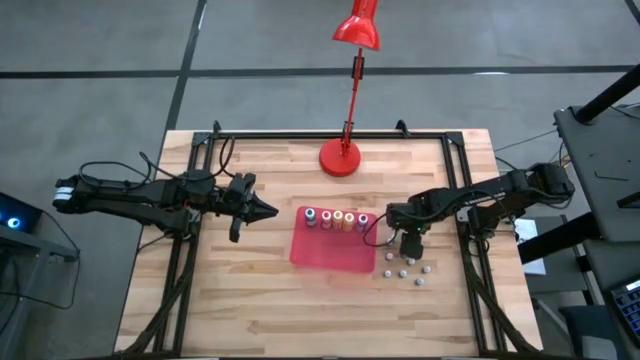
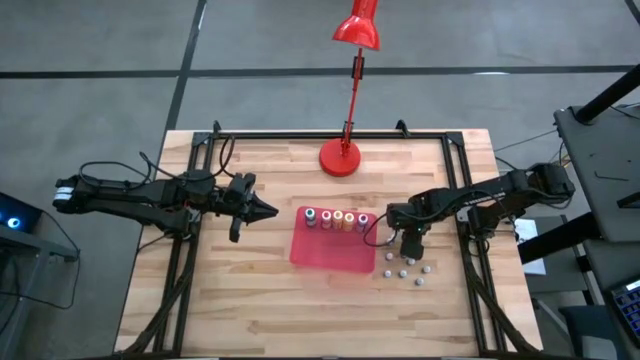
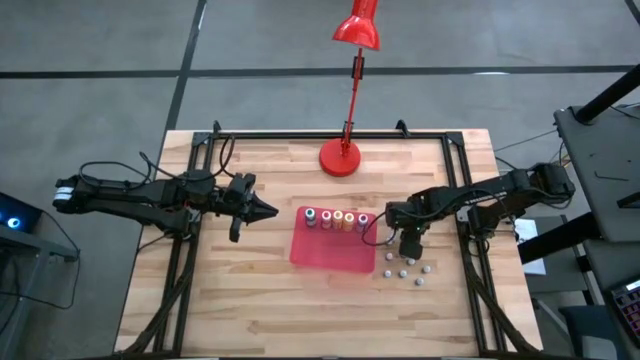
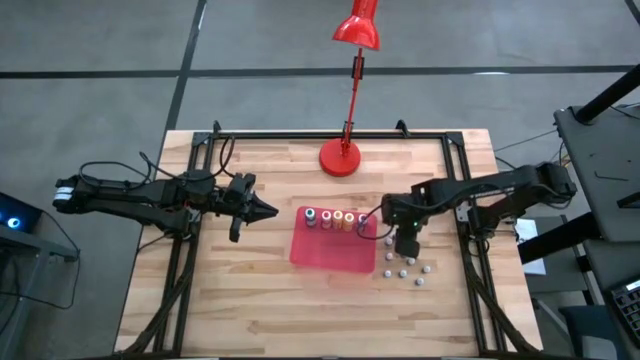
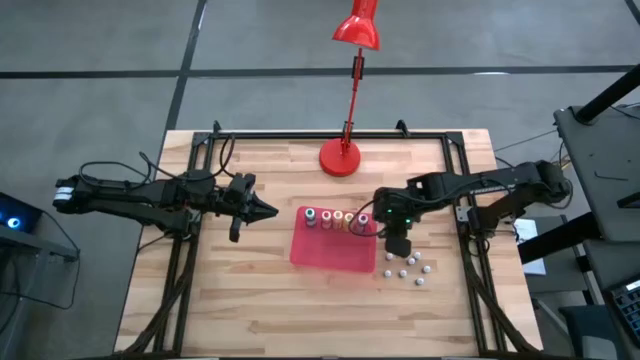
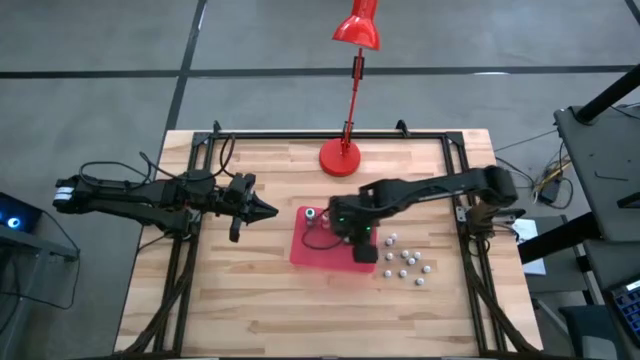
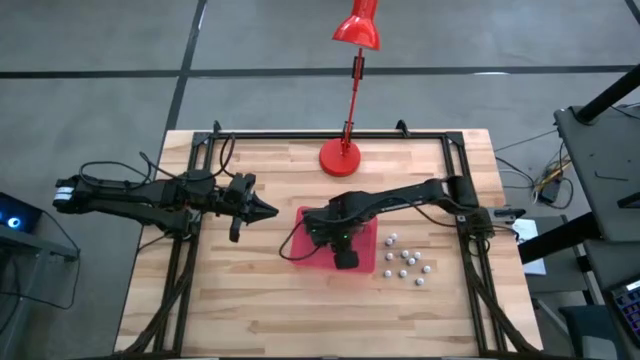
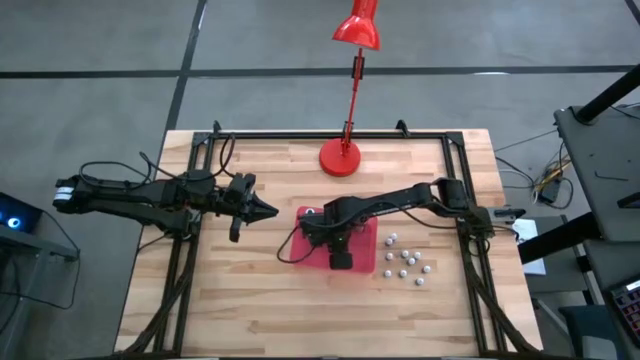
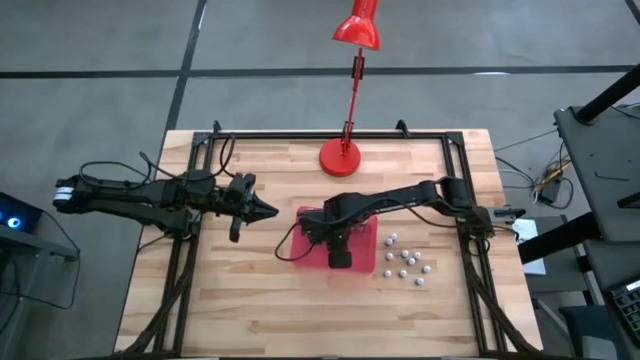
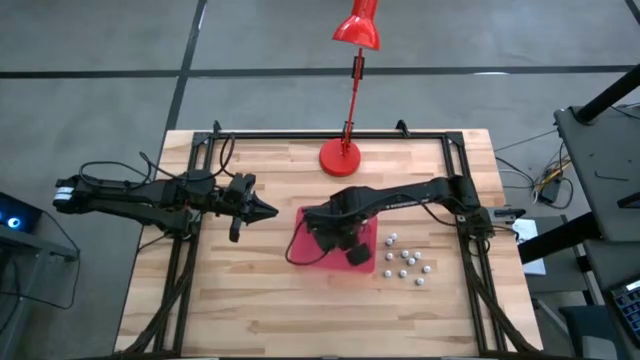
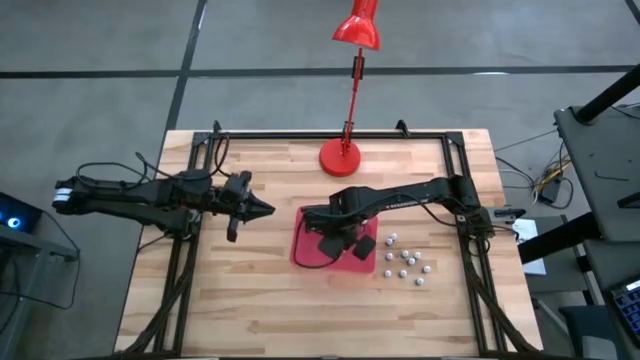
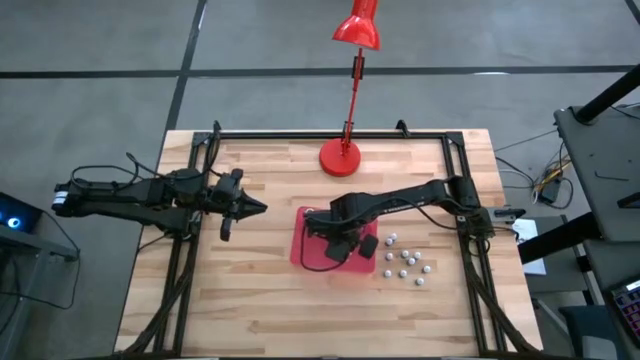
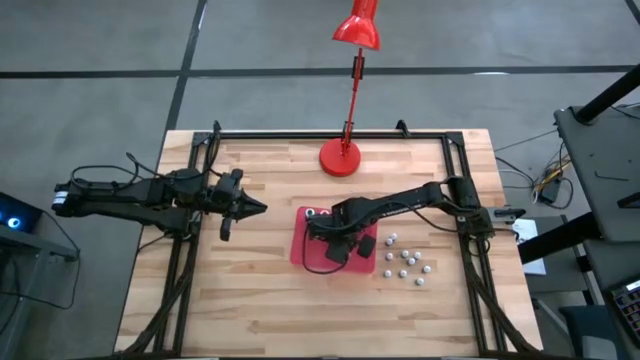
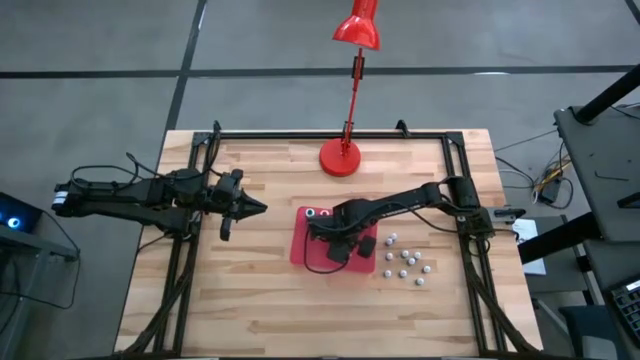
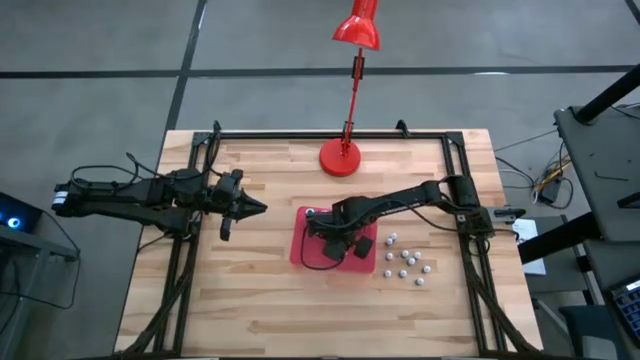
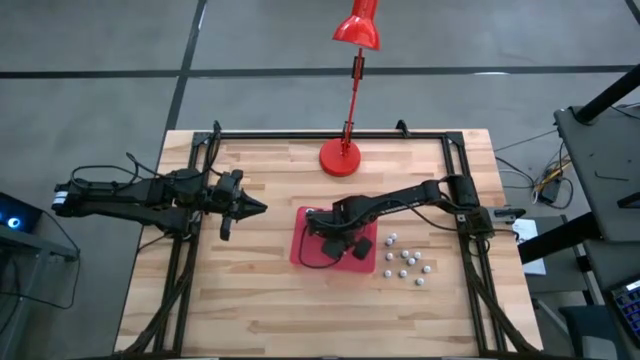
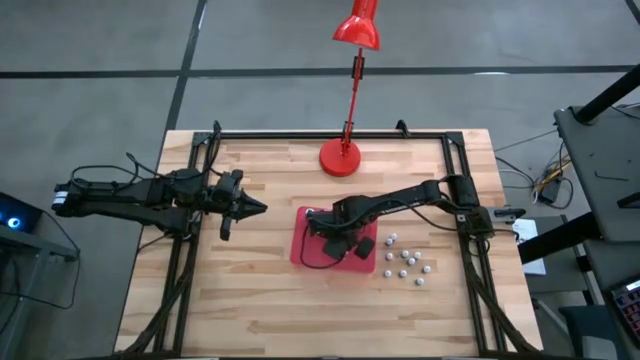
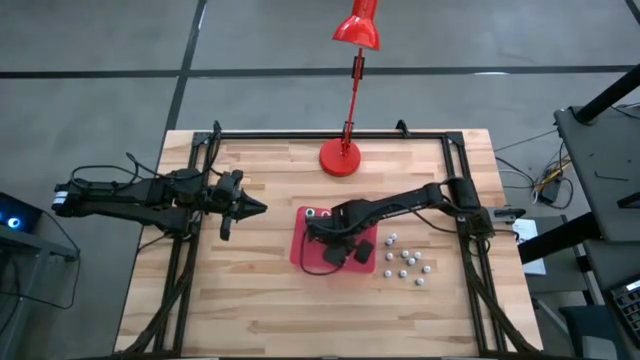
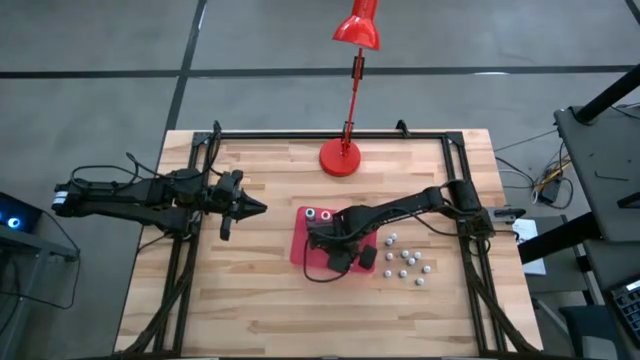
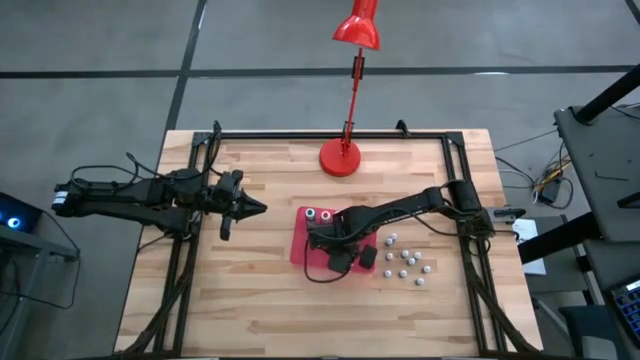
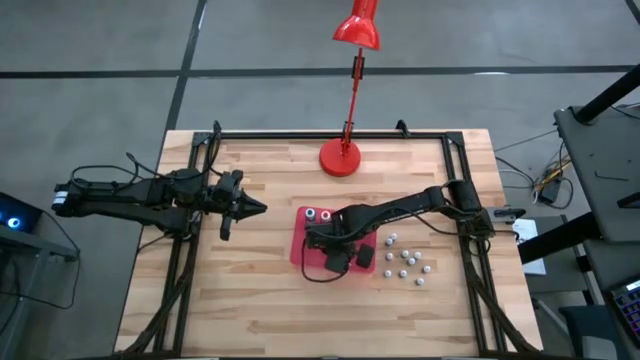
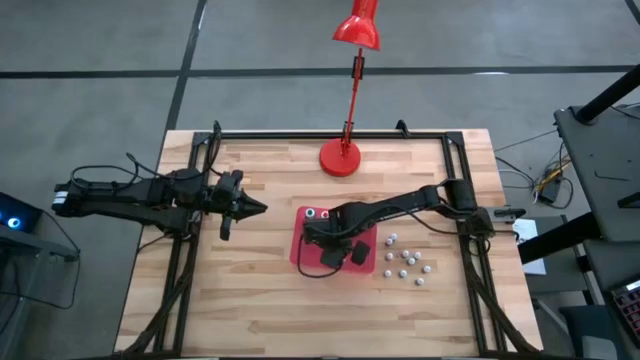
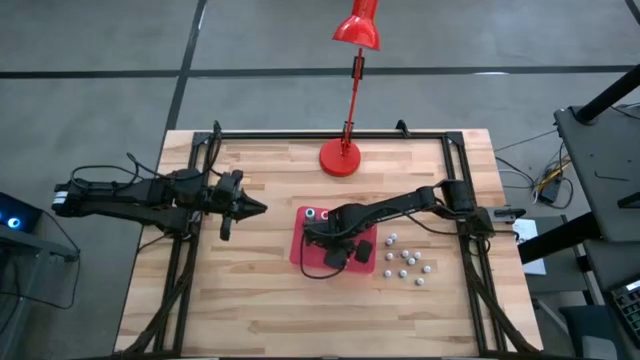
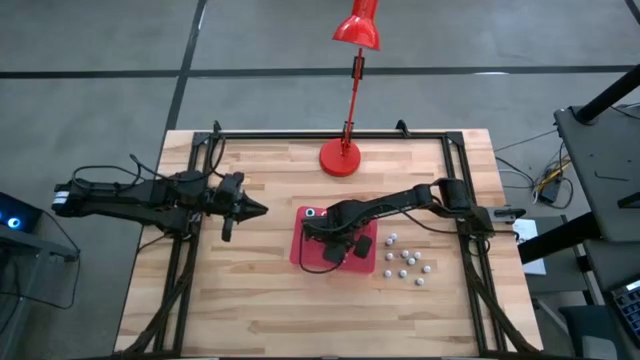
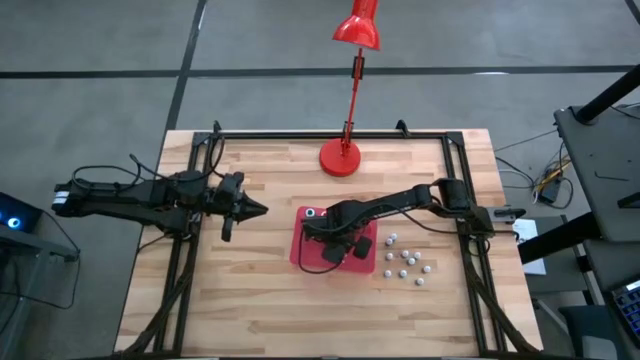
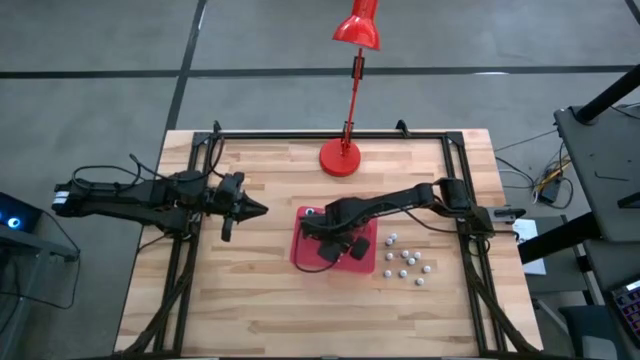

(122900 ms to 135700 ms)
Task: Pick & Place food coloring
Put the small black food coloring bottle into the red bin

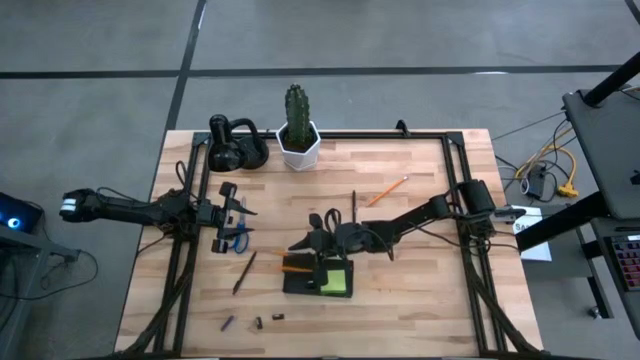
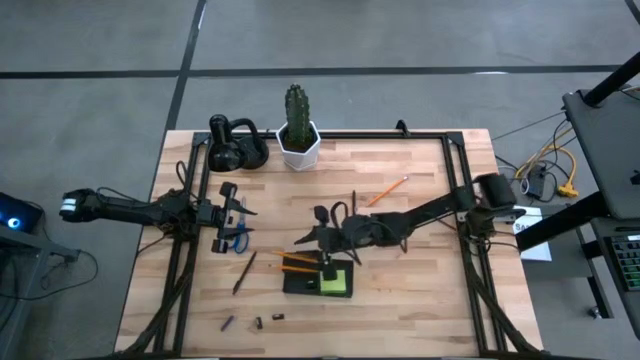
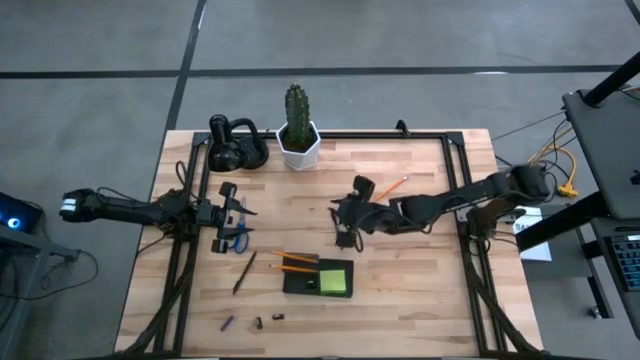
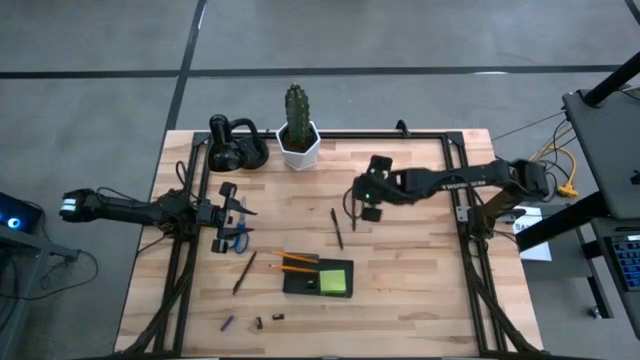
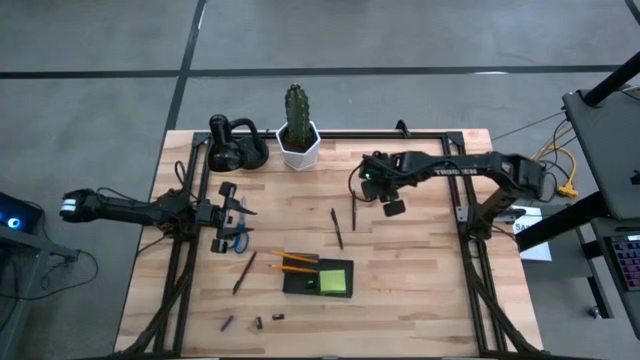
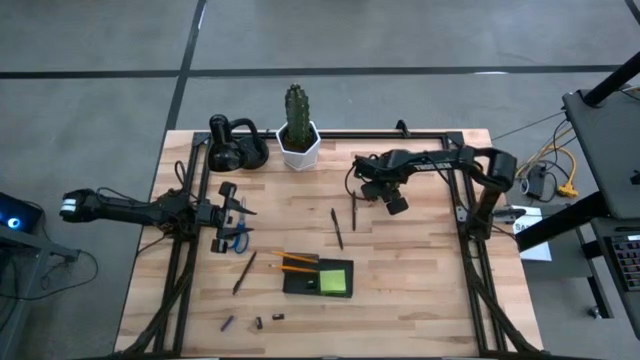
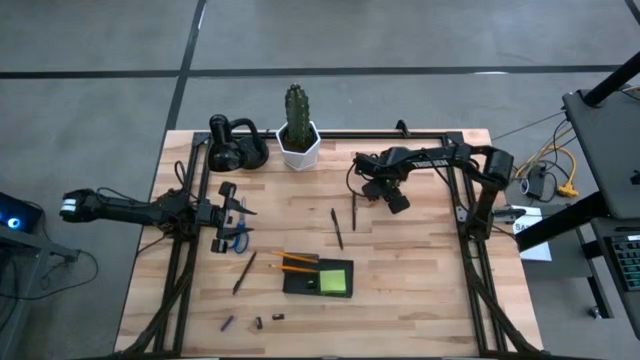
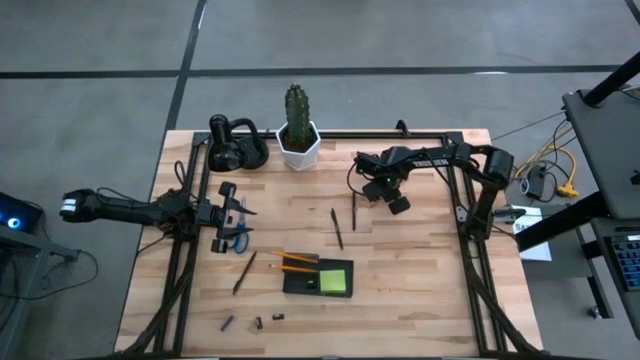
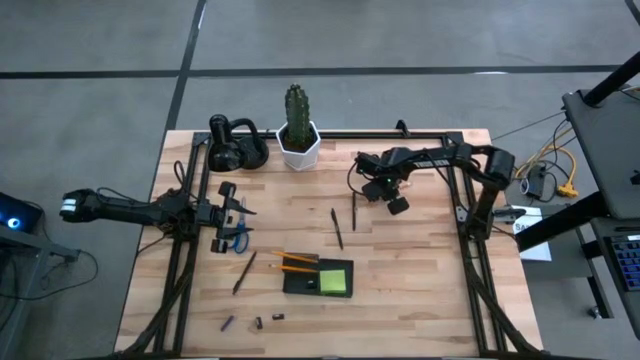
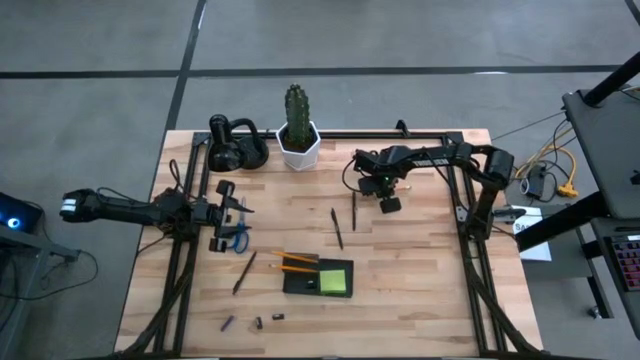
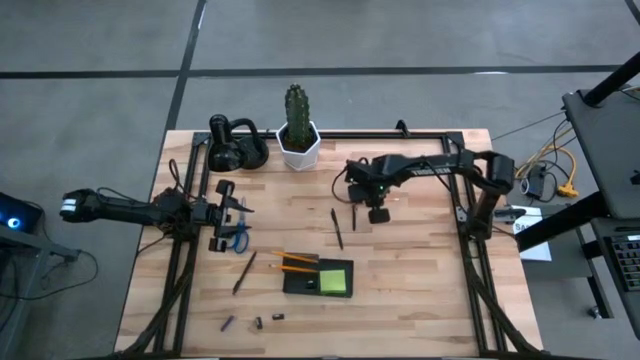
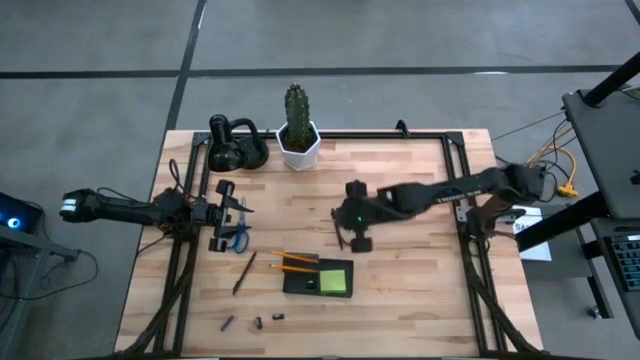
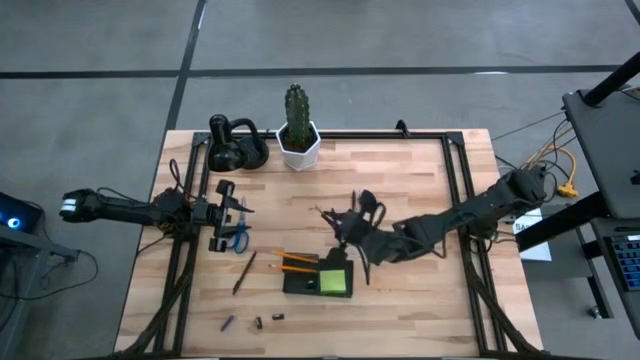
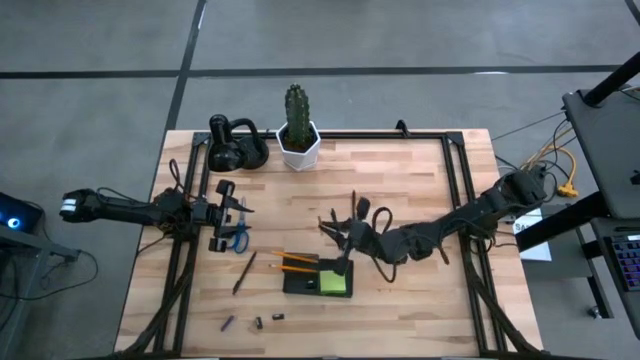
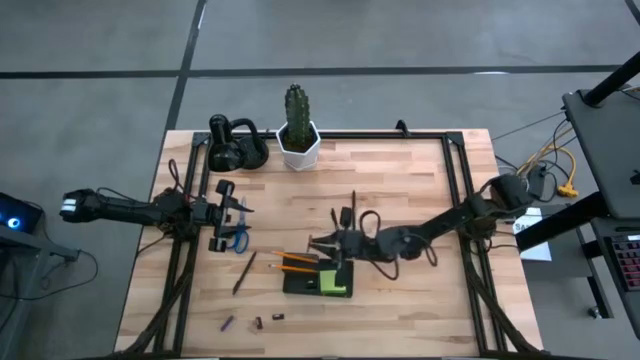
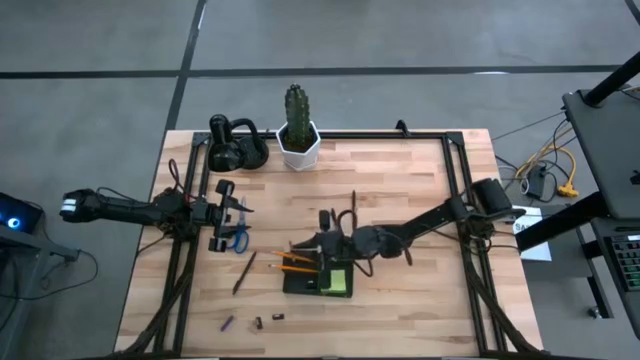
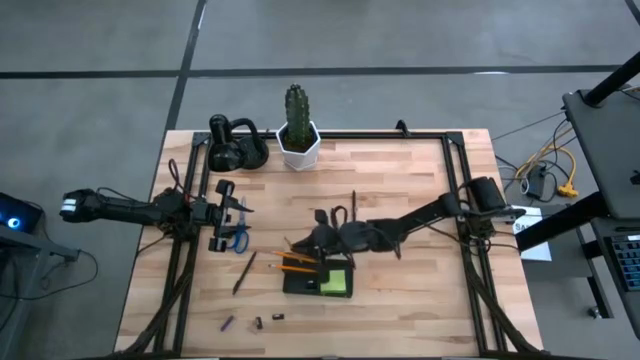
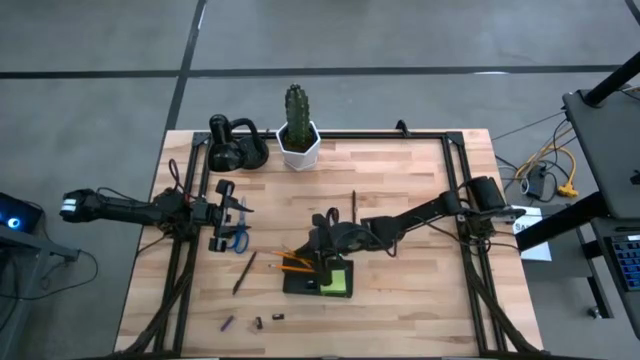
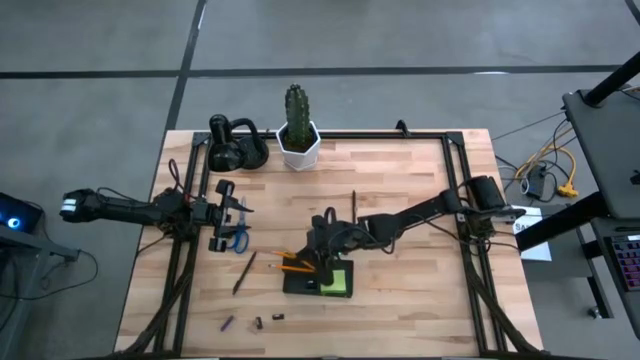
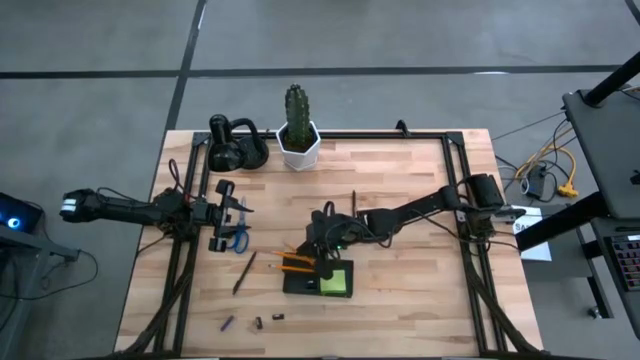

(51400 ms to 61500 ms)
Task: Pick and place office supplies into organizer
Put the yellow pencil into the desk organizer
